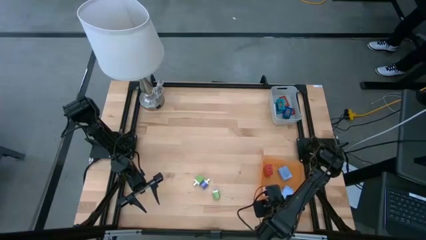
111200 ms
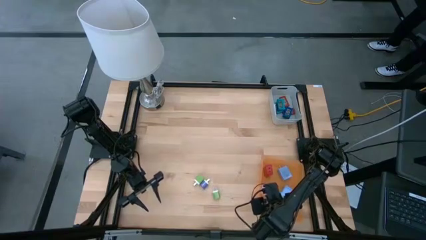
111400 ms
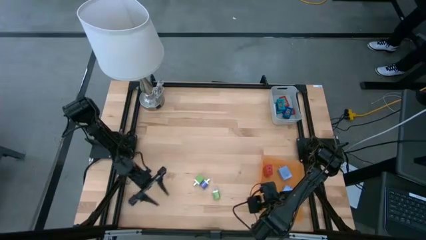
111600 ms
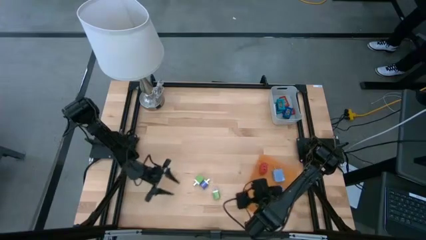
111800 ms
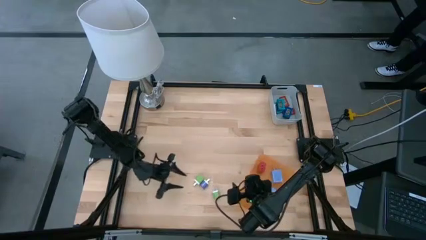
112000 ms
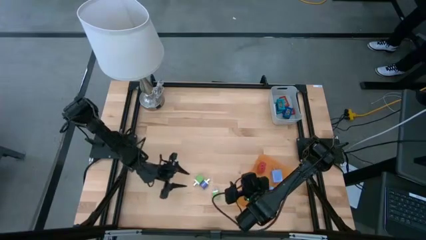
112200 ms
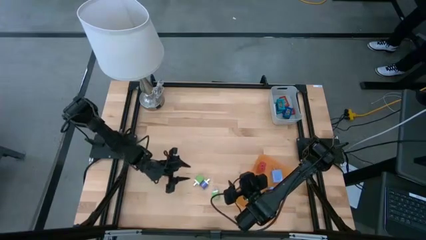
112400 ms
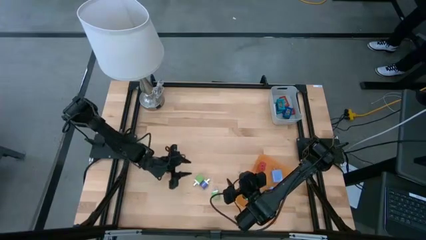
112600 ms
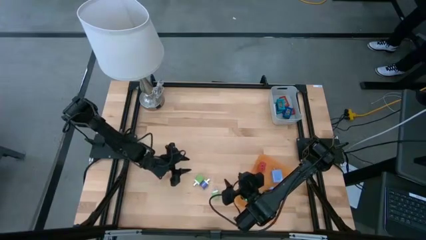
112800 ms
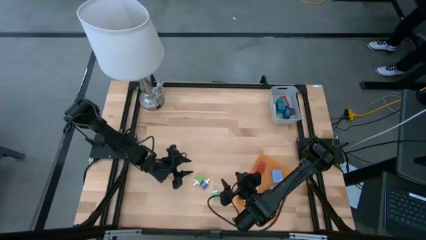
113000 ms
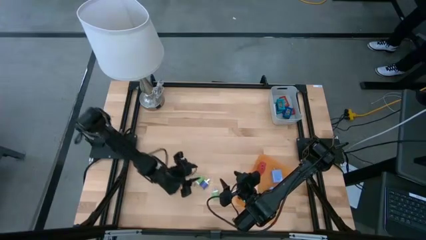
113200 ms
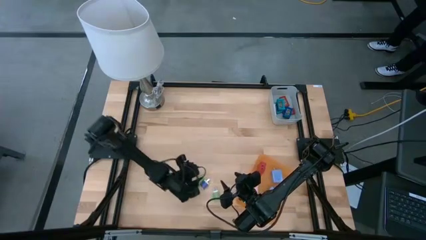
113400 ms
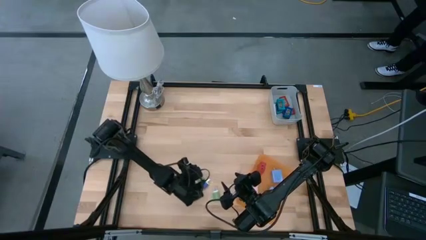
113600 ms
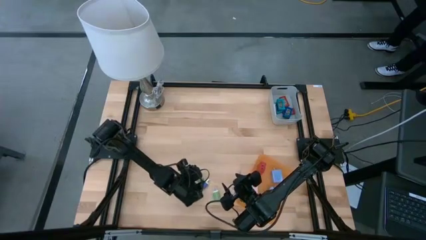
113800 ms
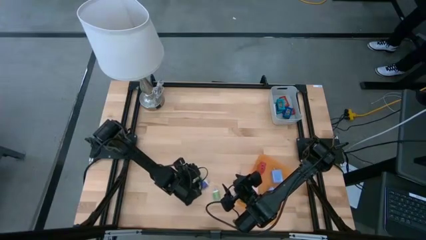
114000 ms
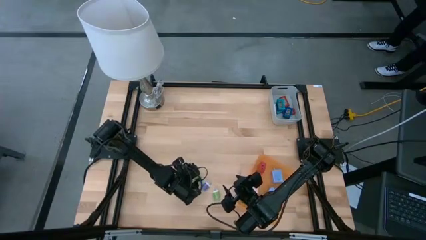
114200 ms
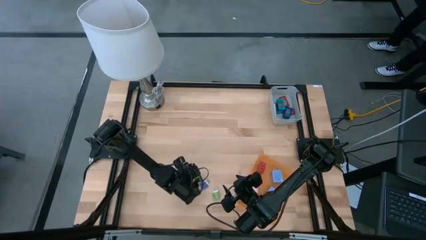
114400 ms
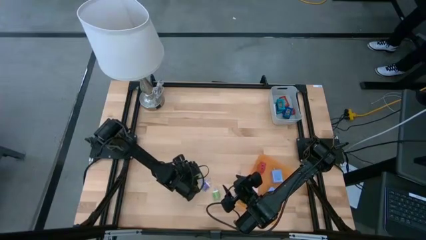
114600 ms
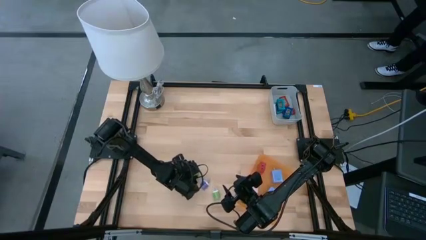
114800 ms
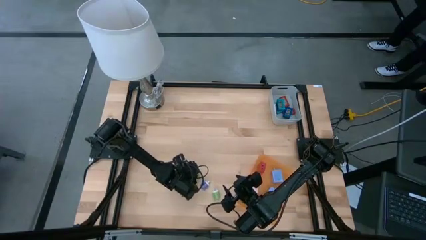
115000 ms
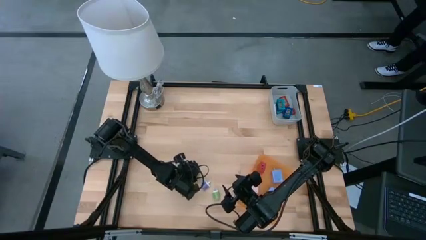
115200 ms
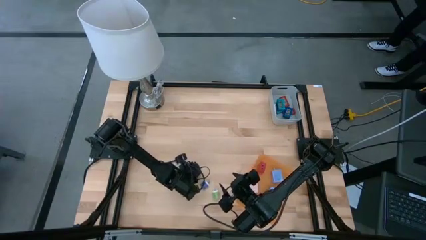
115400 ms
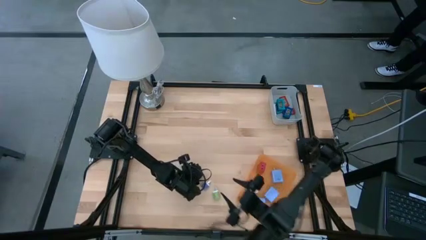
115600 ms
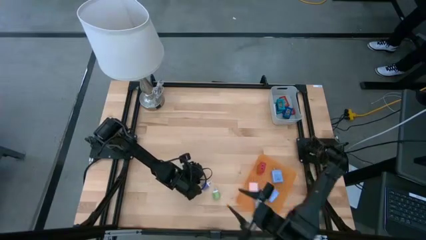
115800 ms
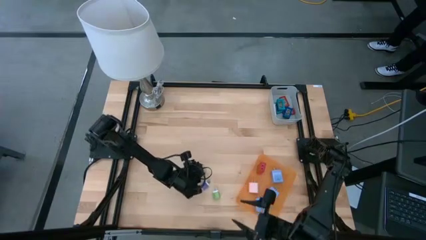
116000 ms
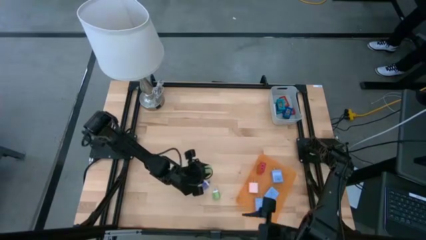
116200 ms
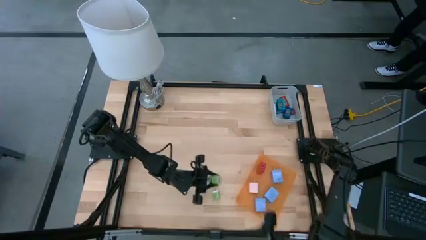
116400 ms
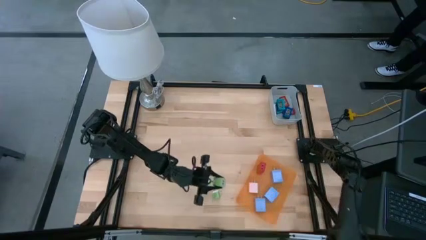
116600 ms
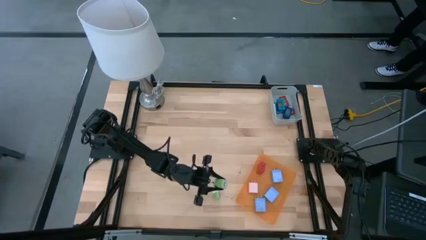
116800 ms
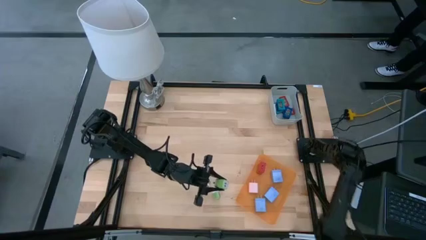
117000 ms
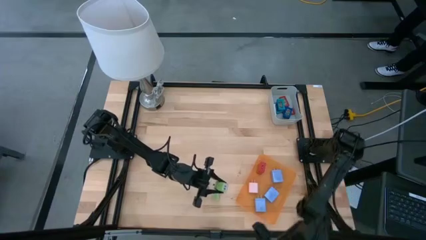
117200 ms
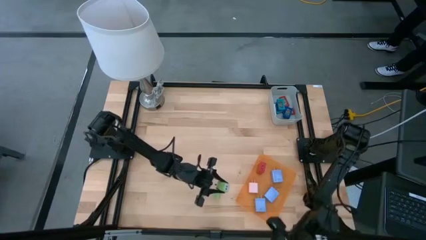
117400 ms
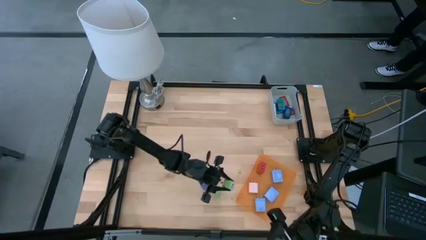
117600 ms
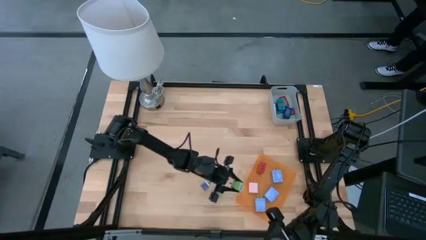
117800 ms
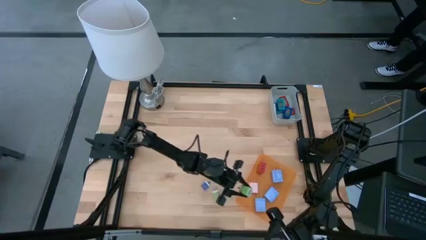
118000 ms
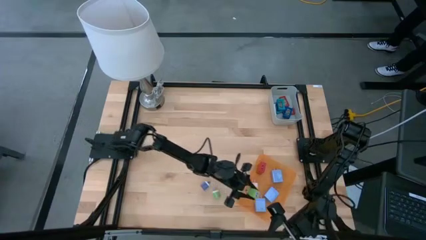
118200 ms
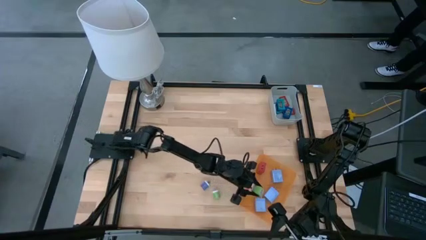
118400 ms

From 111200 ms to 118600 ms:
Task: Pick & Place Office items
Put the left green charger adapter into the orange bin

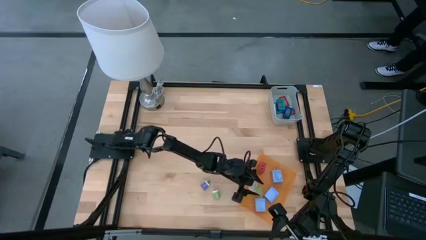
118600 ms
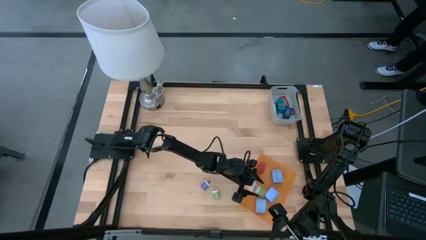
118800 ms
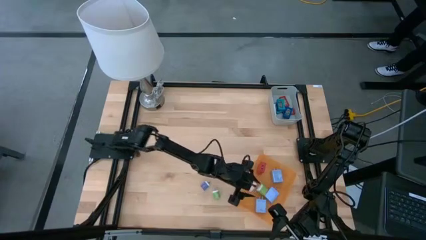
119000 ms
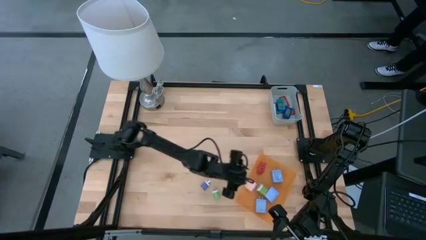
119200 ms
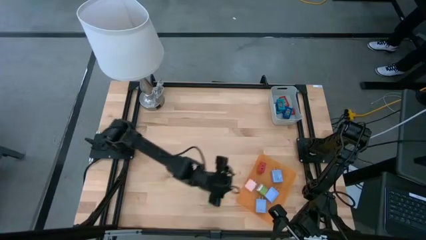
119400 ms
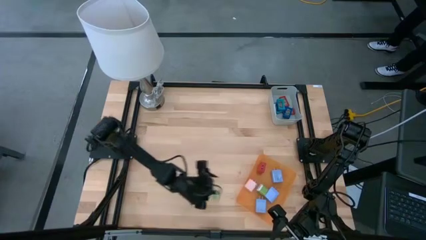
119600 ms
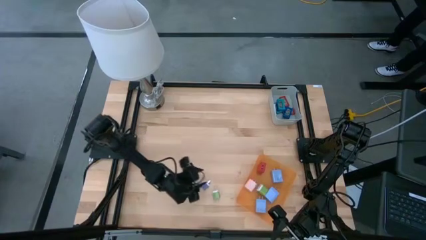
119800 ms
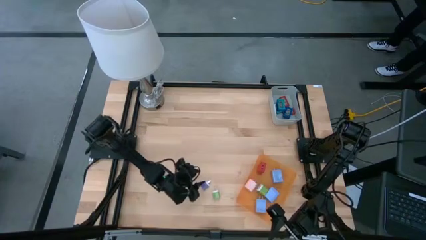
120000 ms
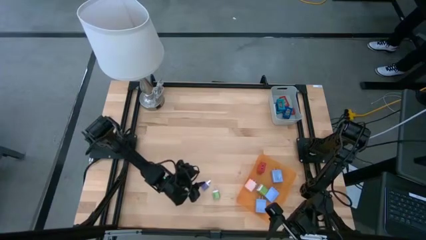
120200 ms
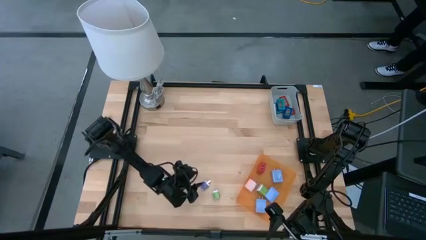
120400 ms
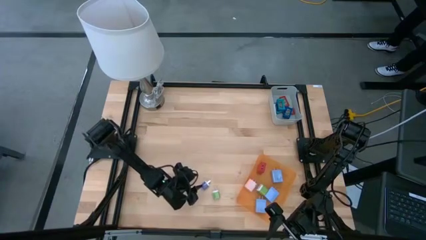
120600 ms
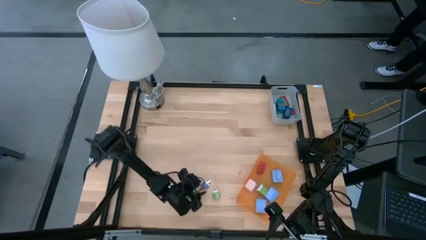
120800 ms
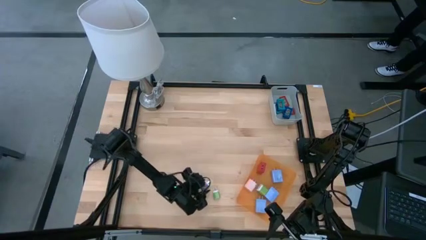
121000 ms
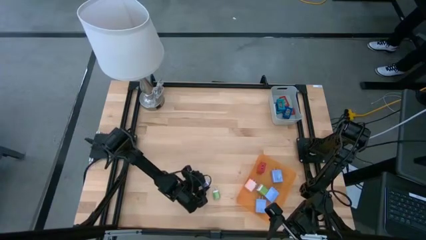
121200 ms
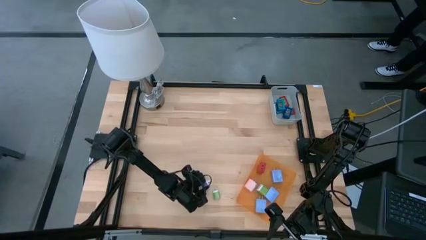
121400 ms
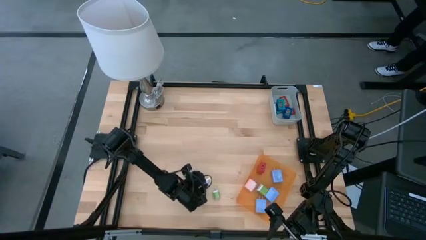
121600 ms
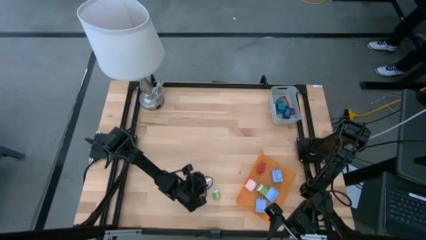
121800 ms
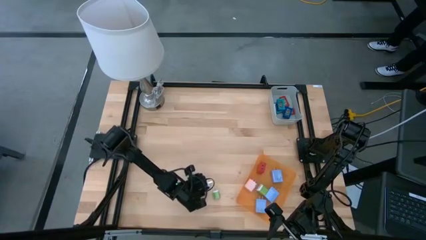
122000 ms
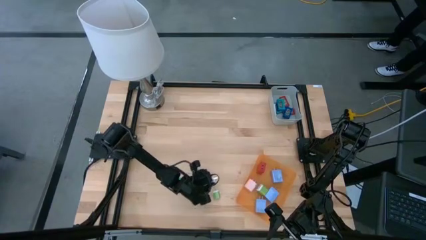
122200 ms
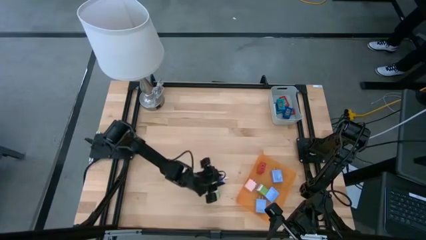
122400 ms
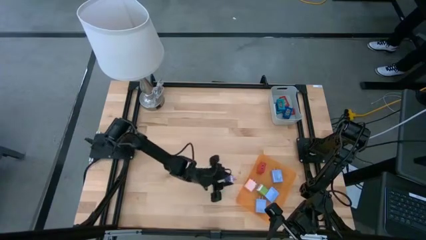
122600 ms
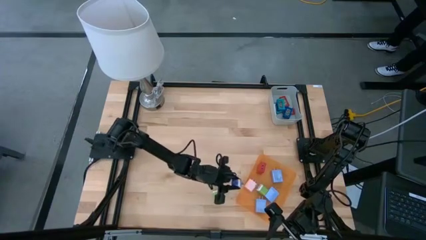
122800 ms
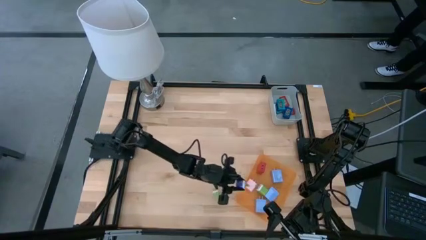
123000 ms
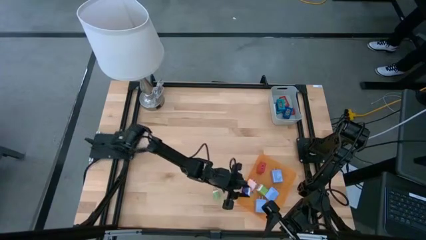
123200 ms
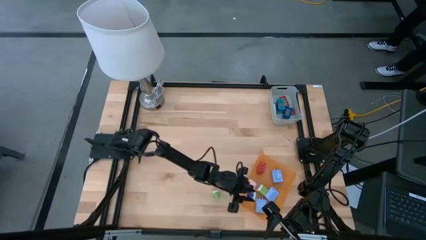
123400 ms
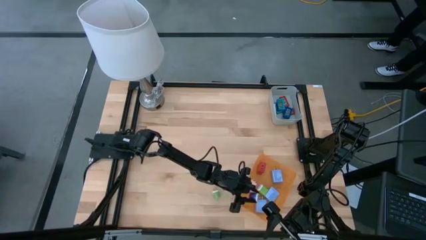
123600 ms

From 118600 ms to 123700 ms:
Put the dark blue charger adapter into the orange bin

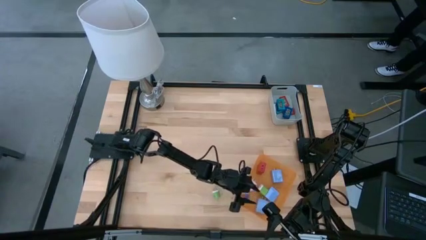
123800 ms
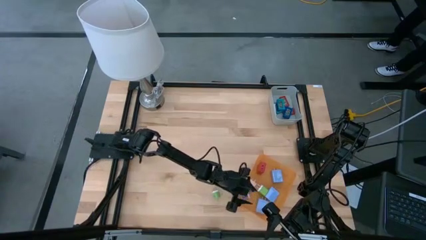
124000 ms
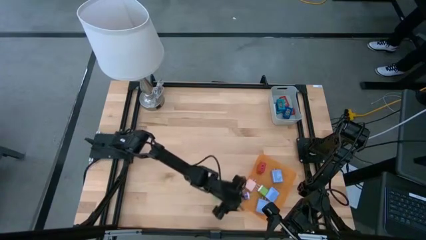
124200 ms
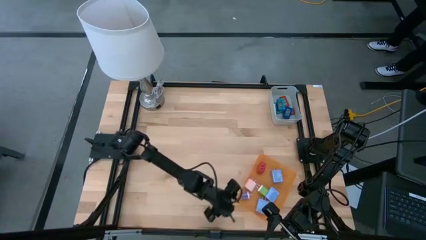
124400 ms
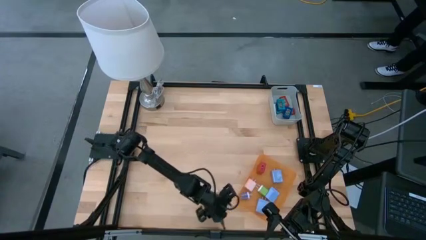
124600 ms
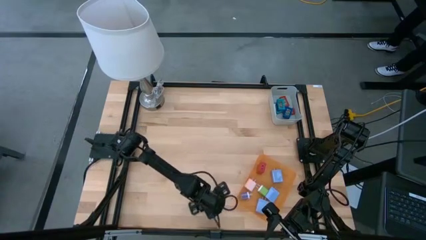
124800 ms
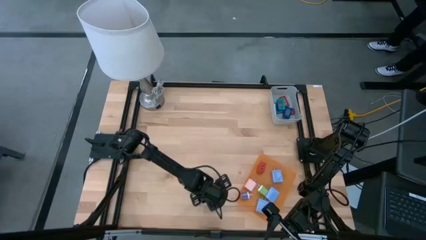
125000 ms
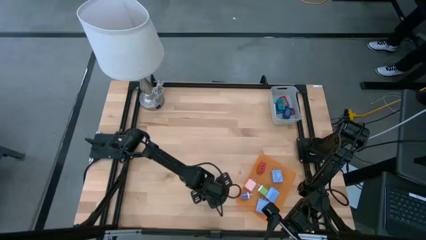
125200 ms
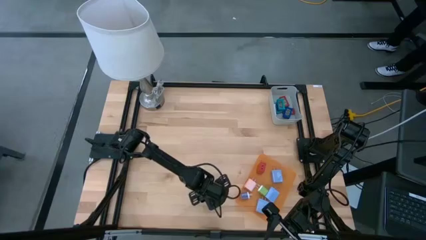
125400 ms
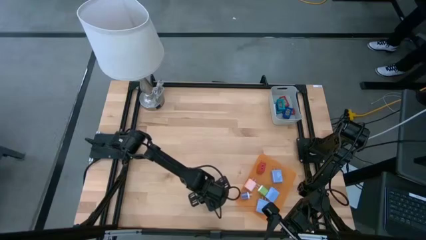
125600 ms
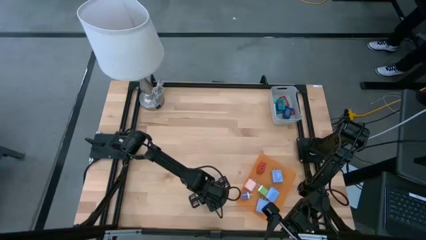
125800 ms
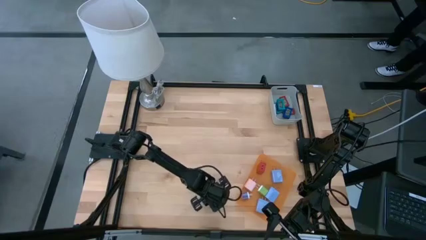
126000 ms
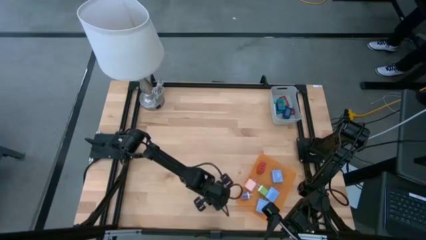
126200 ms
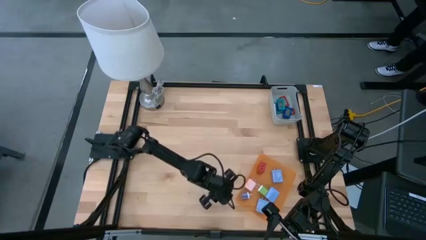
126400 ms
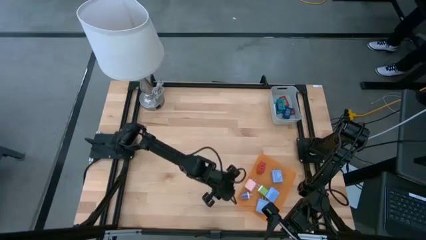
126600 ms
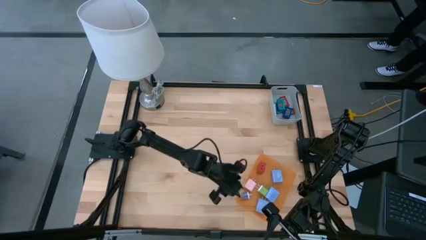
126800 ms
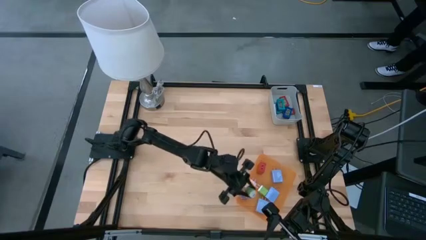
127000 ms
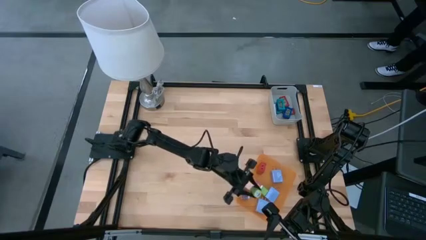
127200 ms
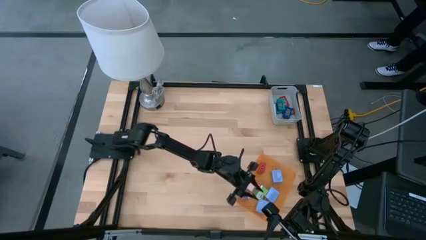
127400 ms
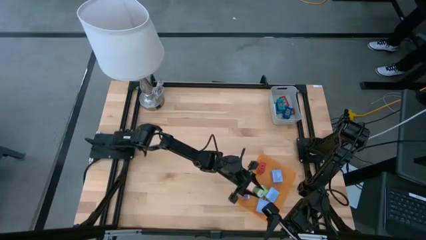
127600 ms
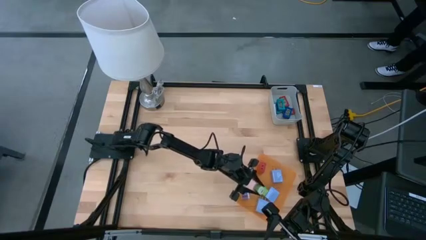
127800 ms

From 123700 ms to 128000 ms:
Put the green charger adapter into the orange bin
